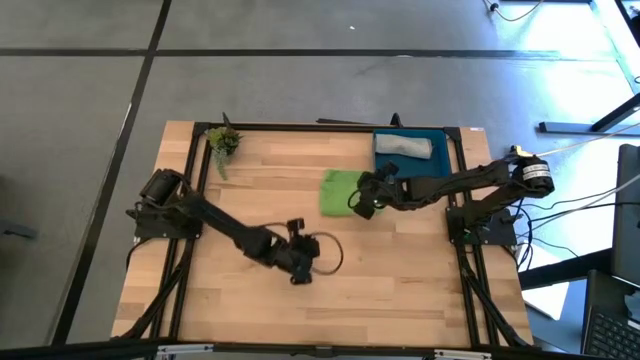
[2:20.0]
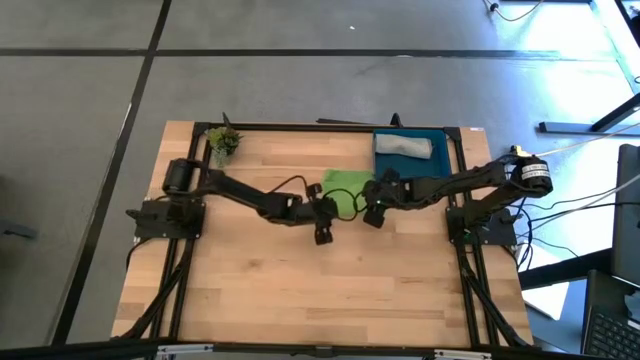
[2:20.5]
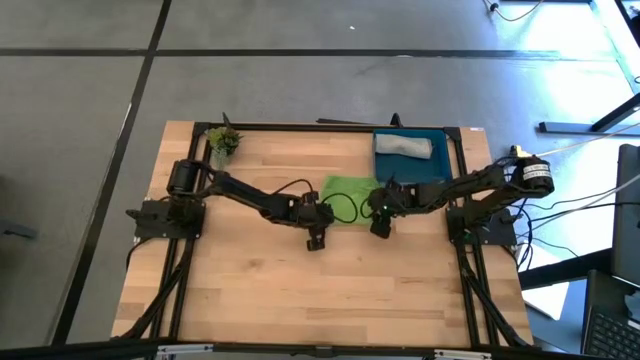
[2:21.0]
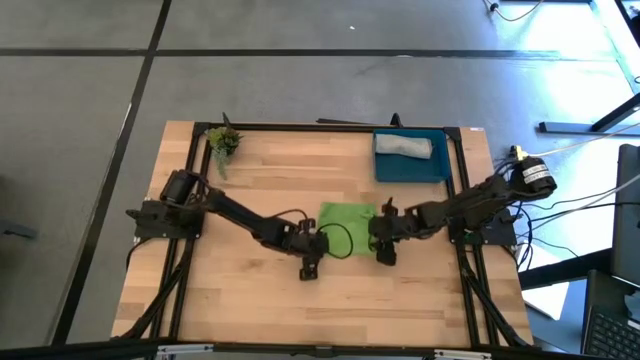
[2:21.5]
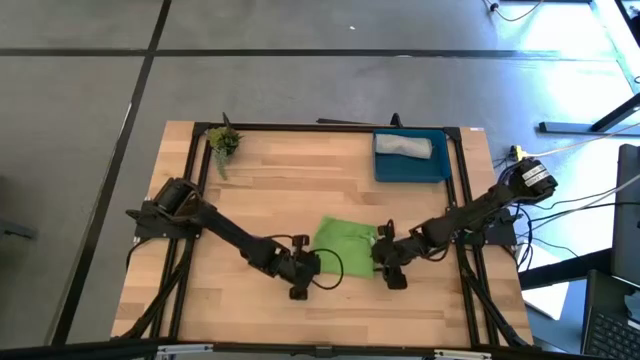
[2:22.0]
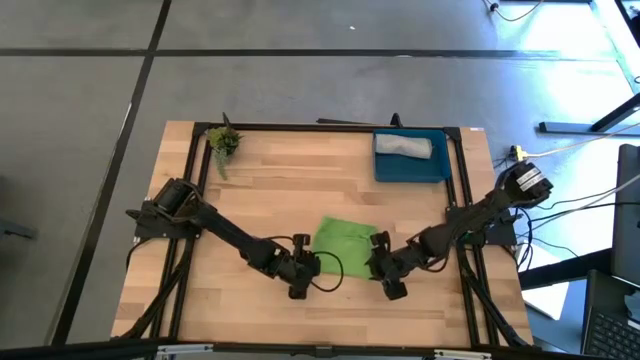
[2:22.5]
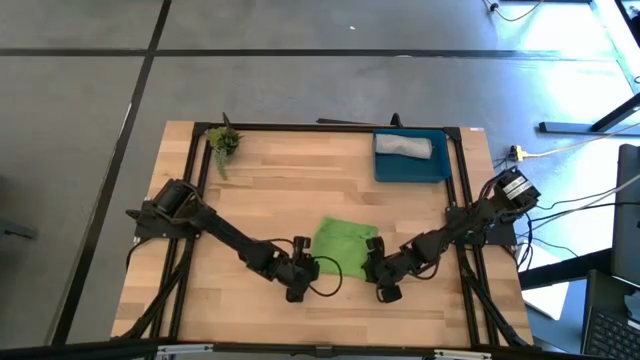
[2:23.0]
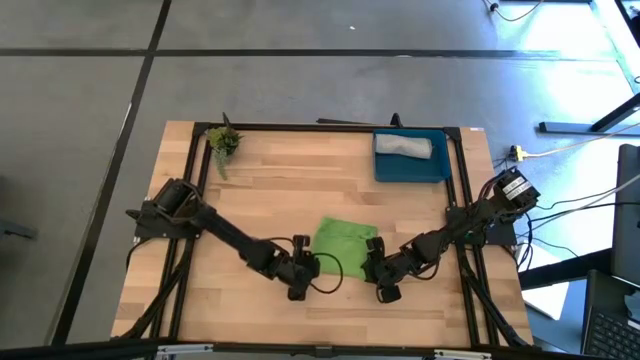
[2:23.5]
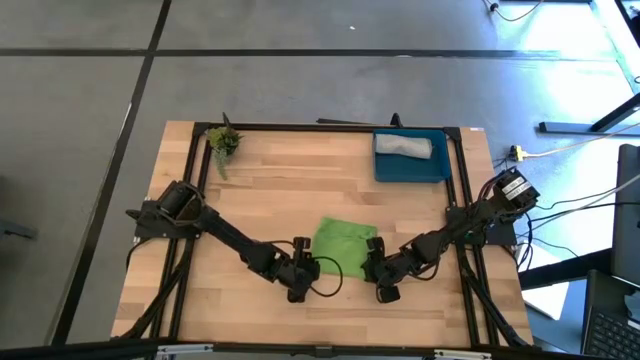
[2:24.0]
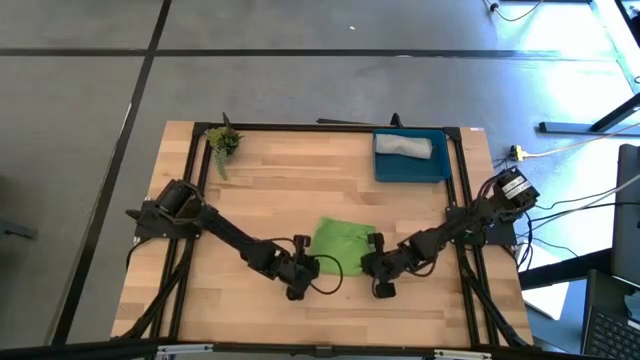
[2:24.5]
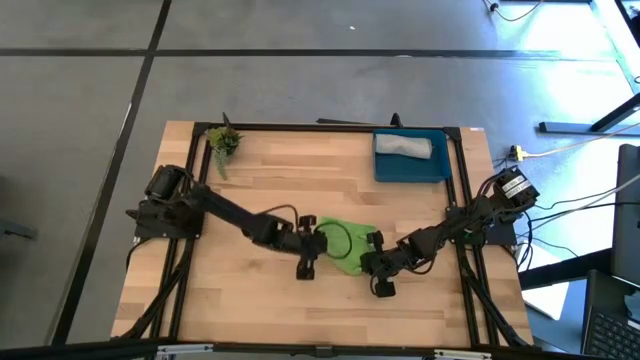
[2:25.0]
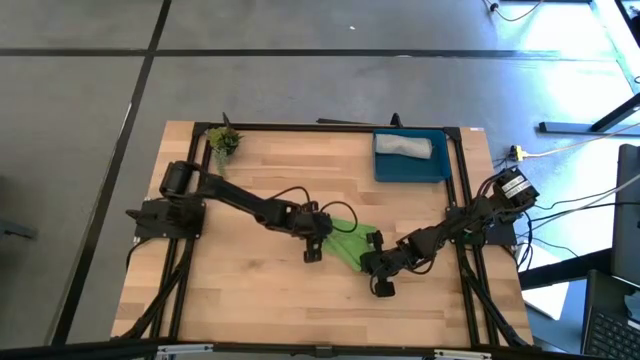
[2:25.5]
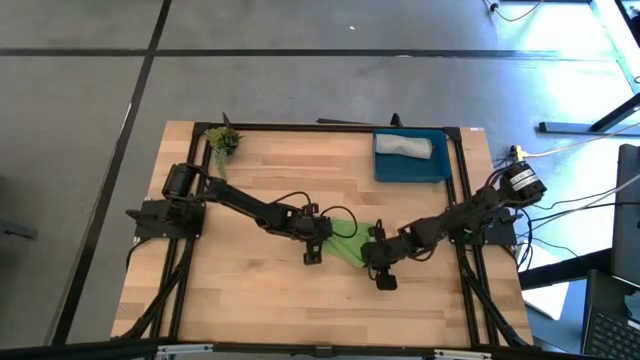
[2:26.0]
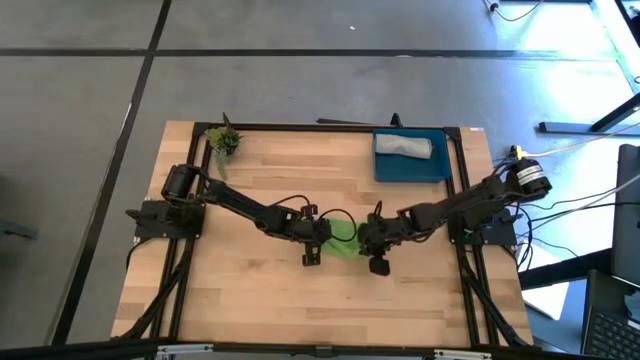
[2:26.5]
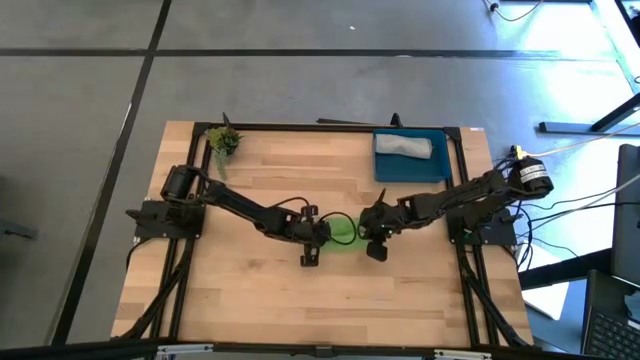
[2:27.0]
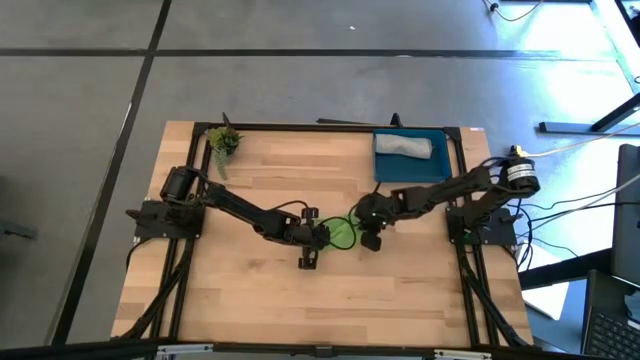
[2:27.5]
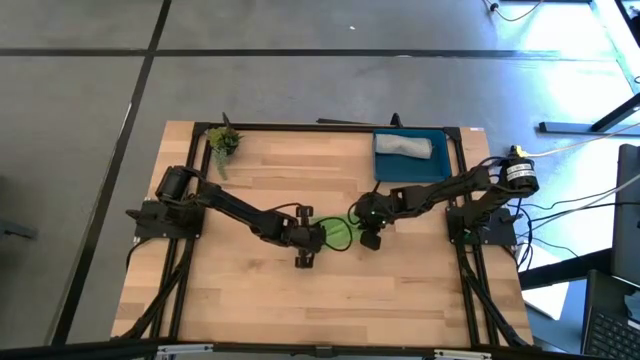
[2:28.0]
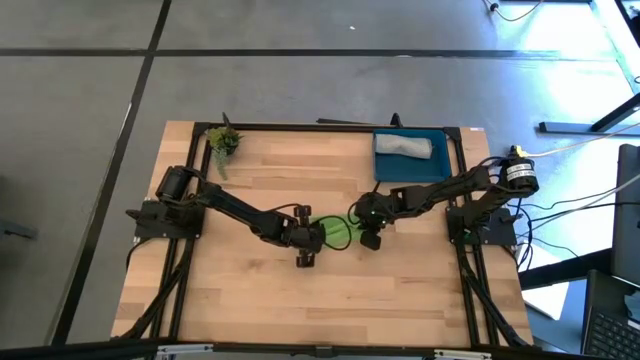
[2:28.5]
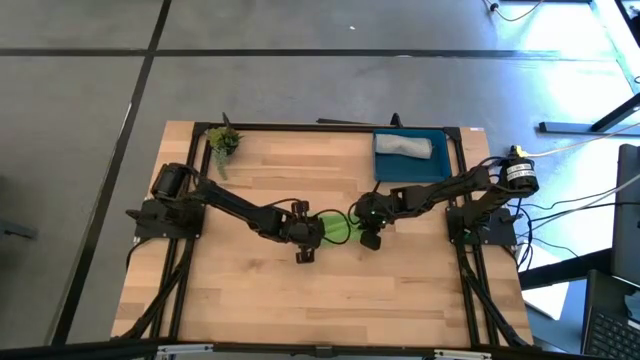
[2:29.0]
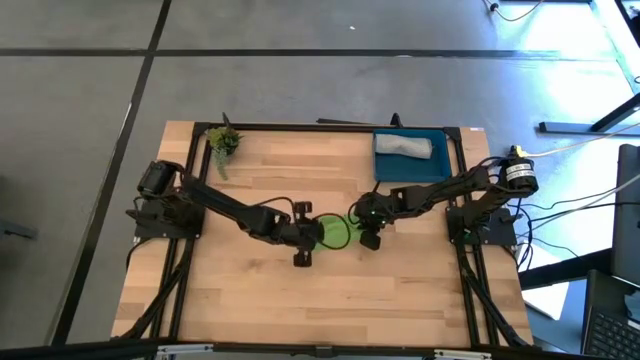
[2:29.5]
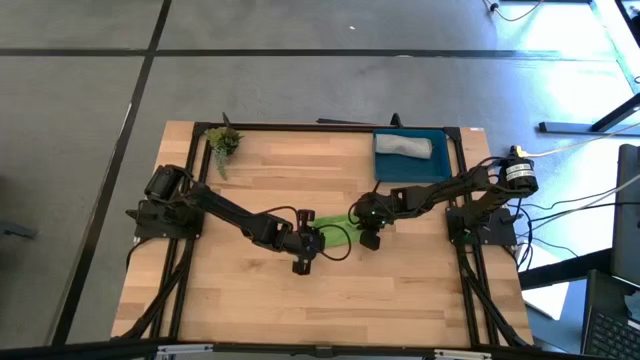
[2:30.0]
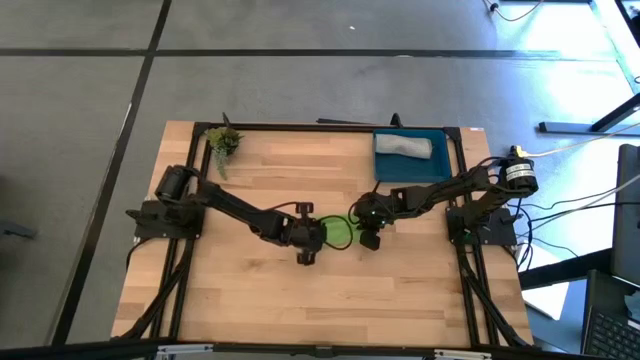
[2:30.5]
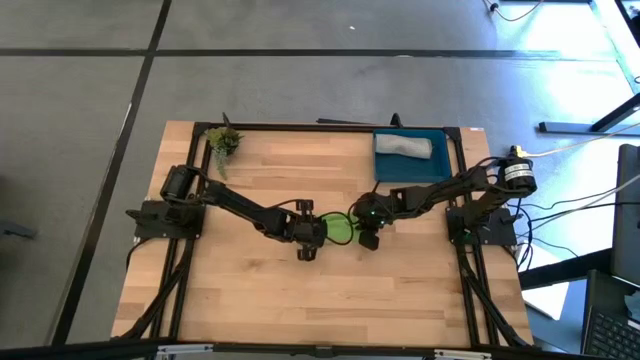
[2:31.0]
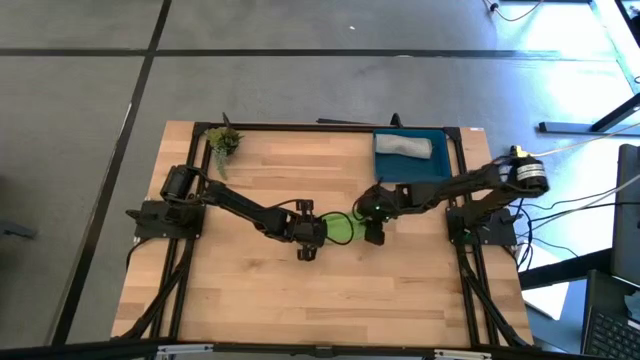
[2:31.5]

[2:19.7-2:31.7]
Task: Roll microfiber towels into tight, uniform cylinder then place into a basket
Roll the green micro fiber cloth

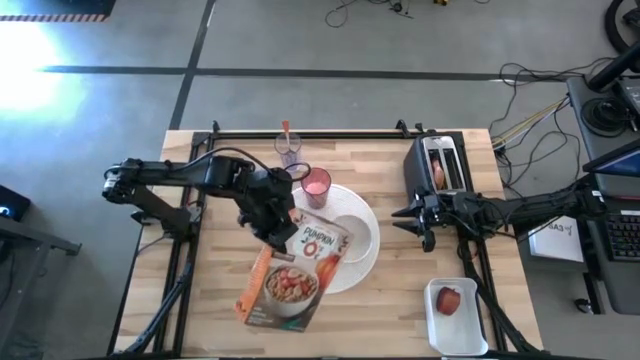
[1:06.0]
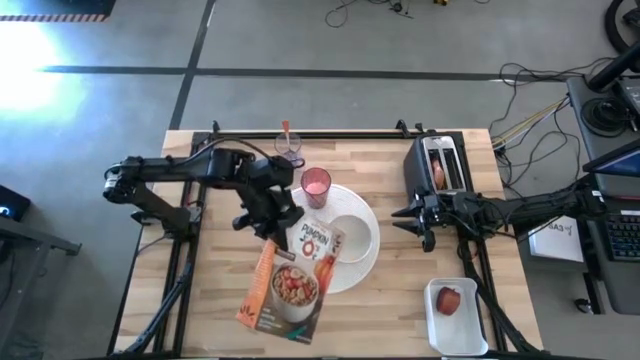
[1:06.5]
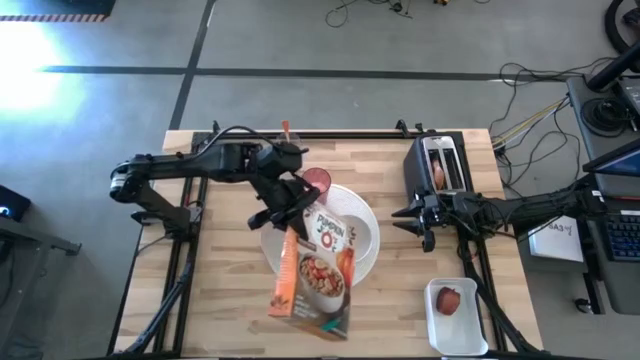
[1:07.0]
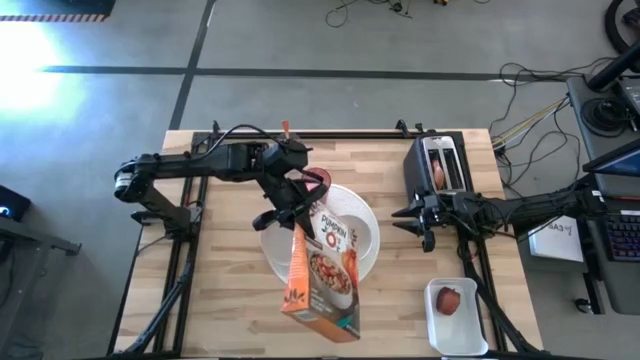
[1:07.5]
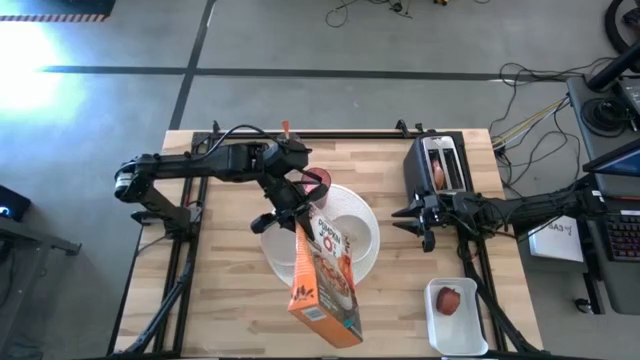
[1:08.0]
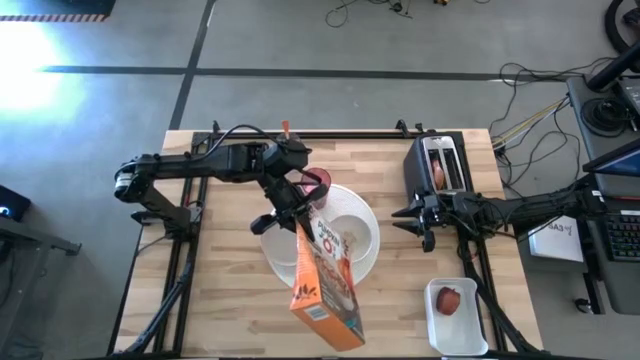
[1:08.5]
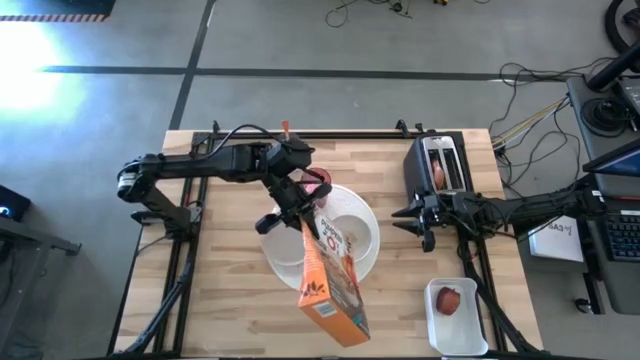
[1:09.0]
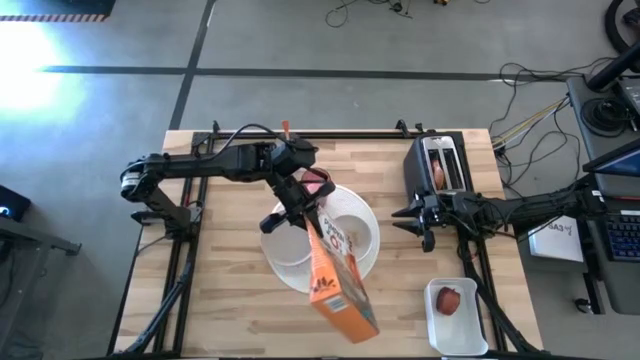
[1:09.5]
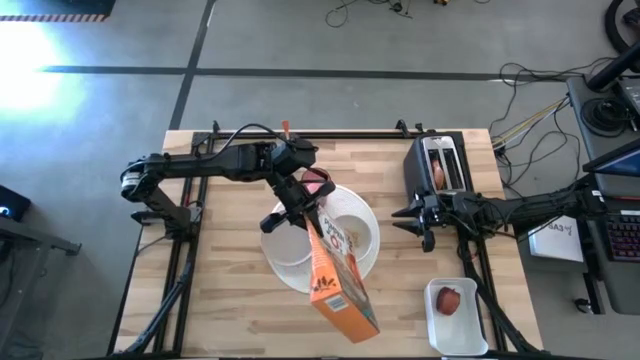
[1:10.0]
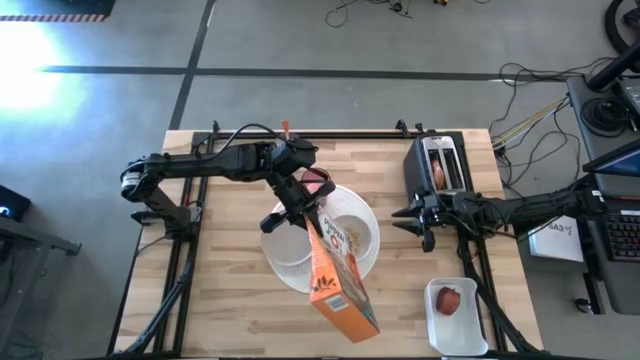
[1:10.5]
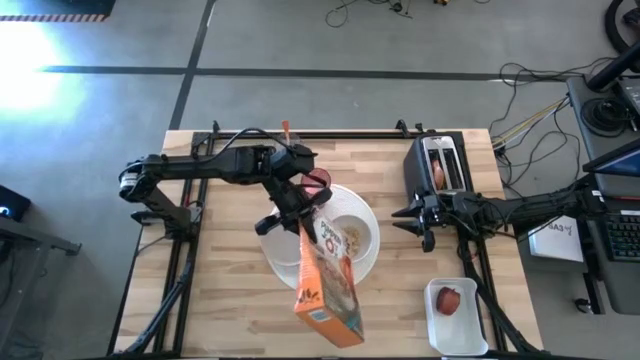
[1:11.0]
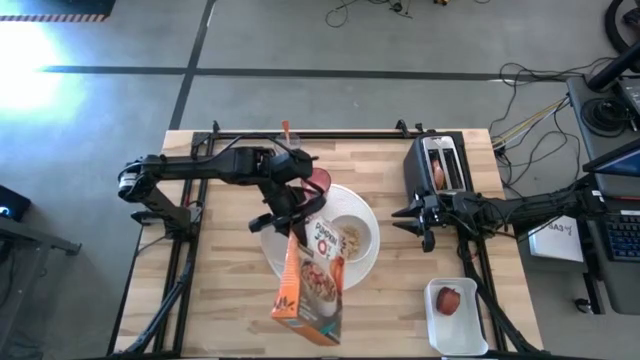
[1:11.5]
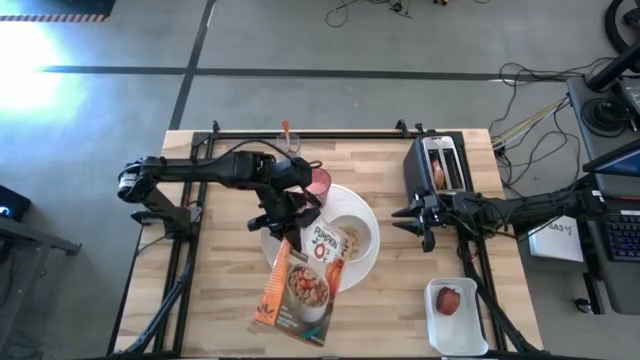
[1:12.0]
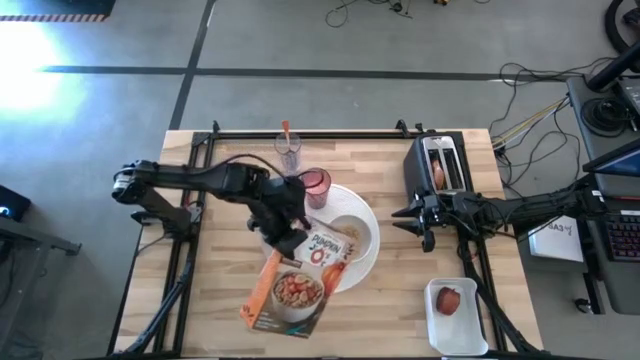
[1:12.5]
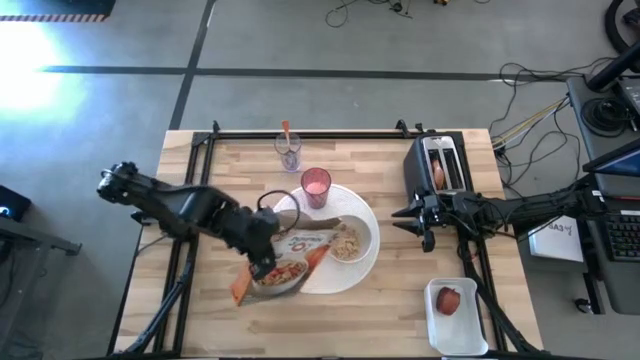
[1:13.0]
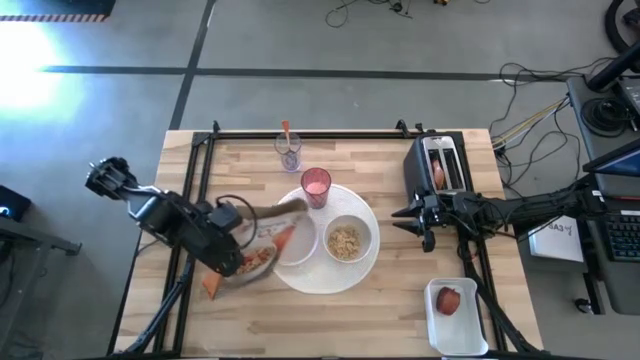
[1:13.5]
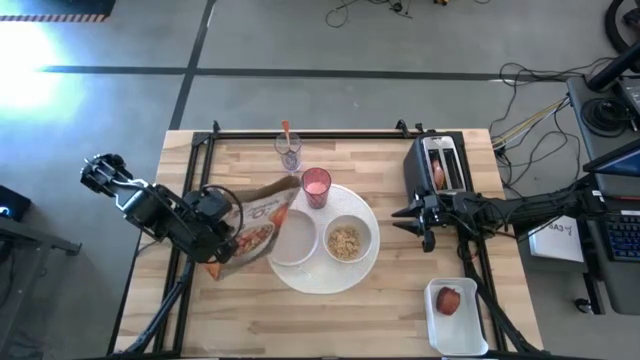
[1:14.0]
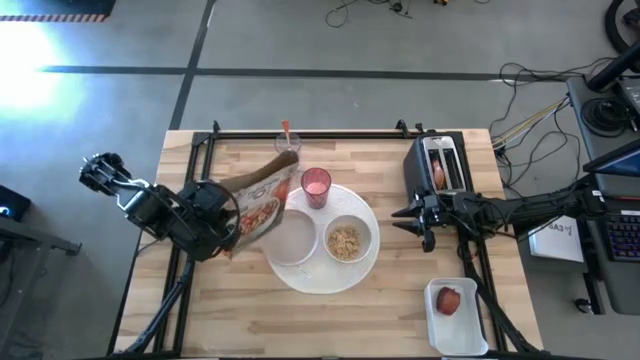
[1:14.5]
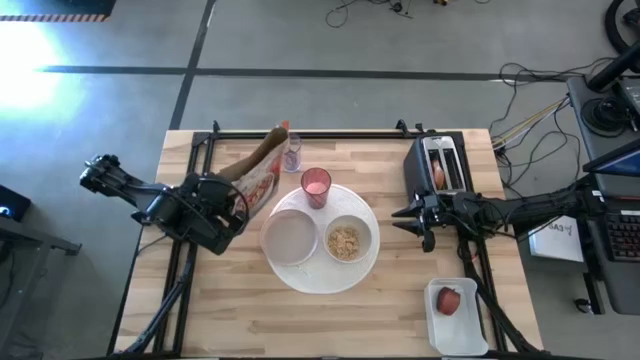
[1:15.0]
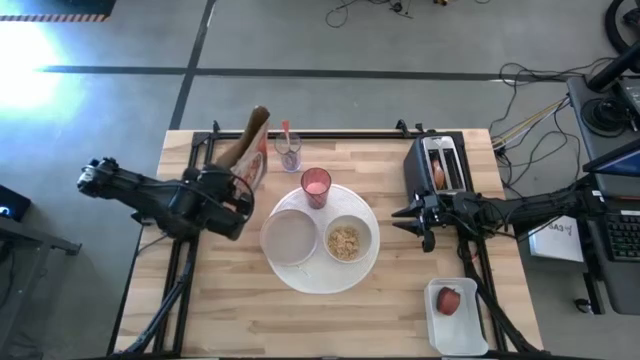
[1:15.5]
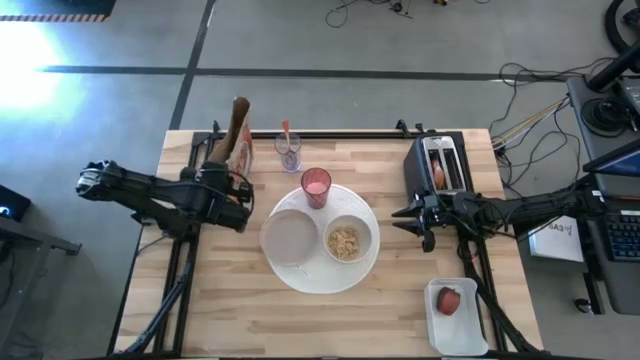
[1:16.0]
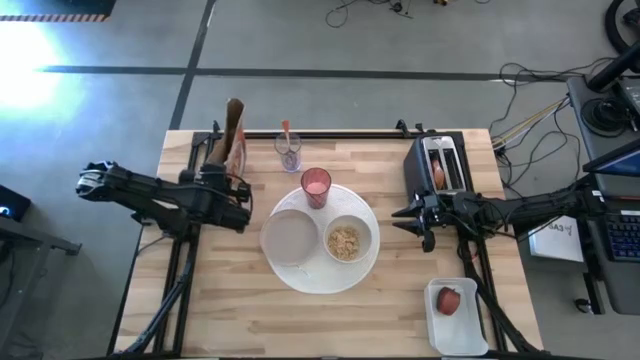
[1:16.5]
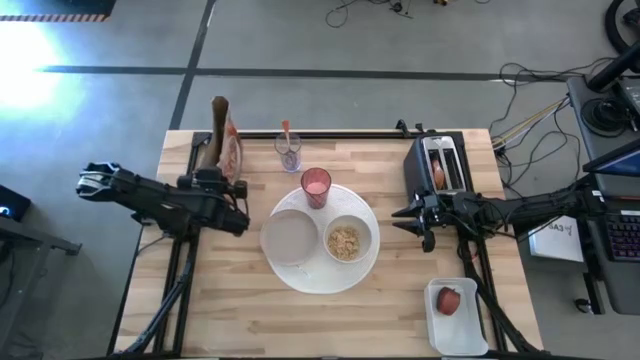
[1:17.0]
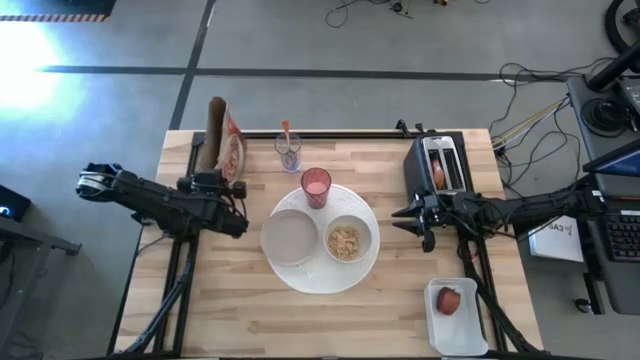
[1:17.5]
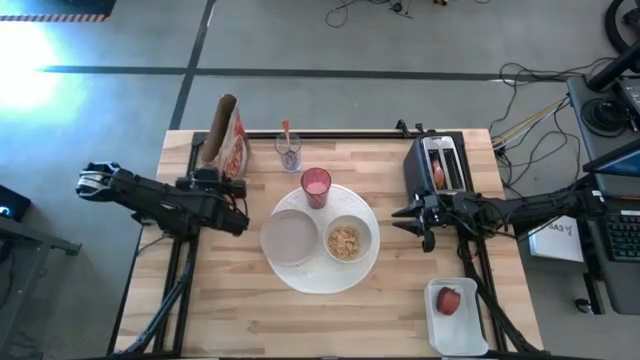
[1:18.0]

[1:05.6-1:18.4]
Task: Arrange a breakfast setting
Pour the white cereal from the orange cereal box into the white bowl
